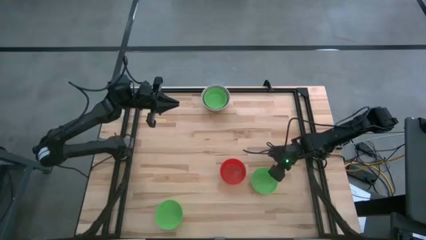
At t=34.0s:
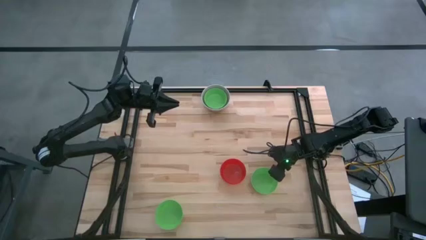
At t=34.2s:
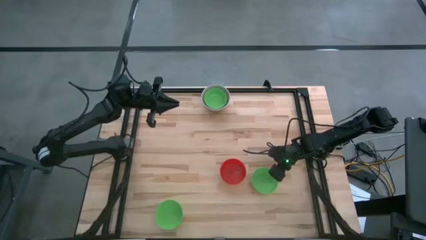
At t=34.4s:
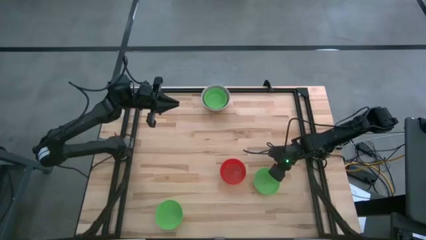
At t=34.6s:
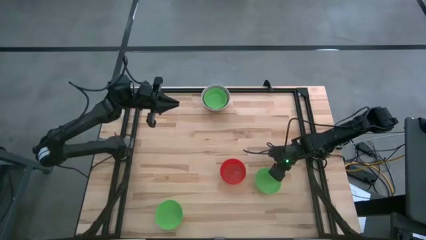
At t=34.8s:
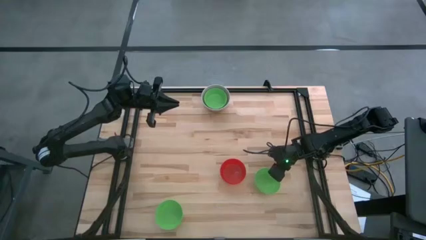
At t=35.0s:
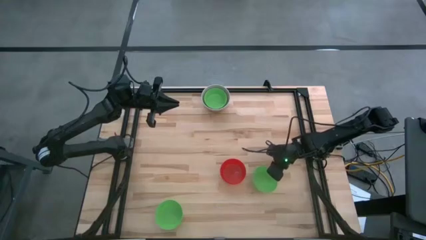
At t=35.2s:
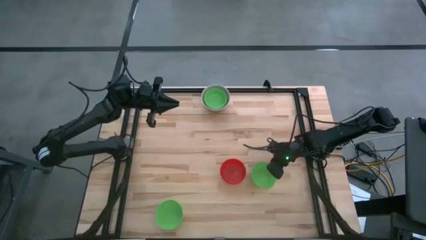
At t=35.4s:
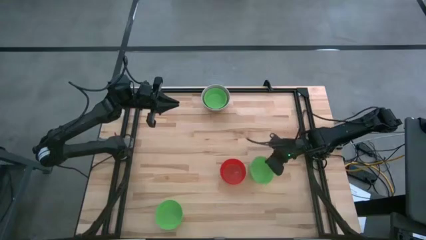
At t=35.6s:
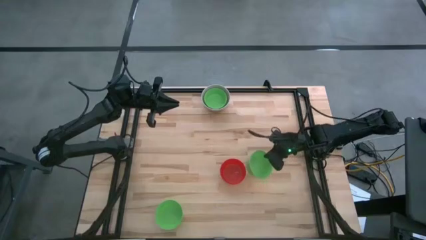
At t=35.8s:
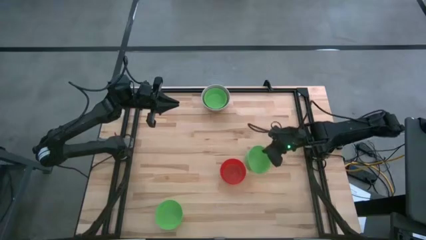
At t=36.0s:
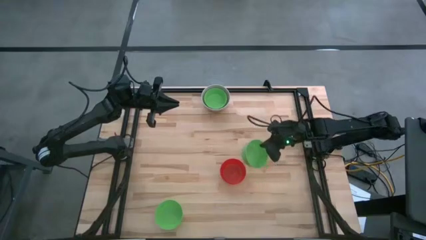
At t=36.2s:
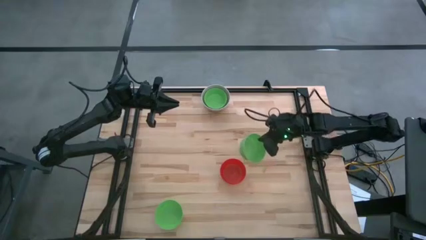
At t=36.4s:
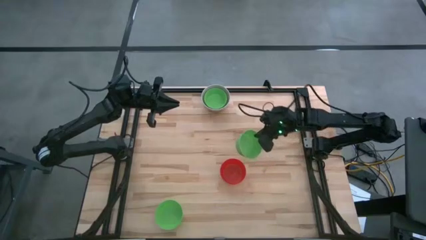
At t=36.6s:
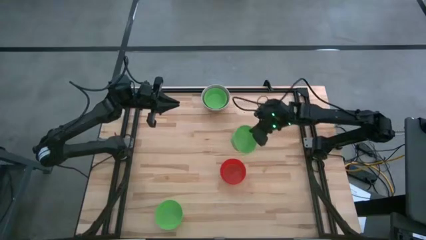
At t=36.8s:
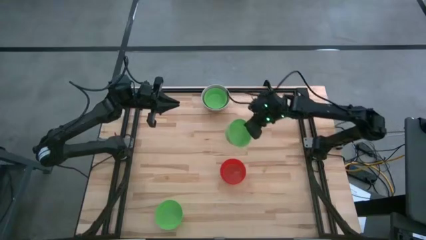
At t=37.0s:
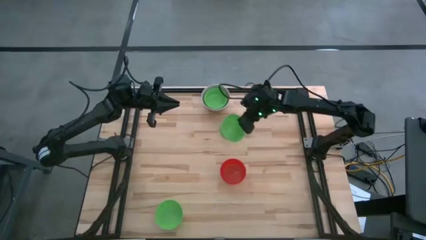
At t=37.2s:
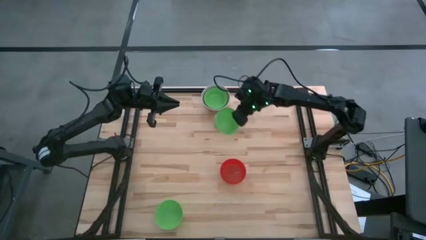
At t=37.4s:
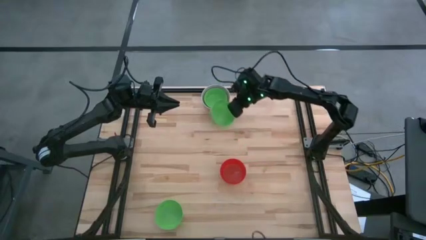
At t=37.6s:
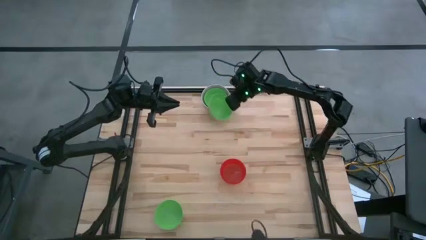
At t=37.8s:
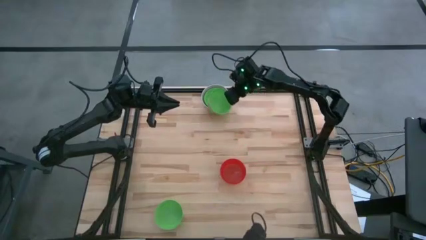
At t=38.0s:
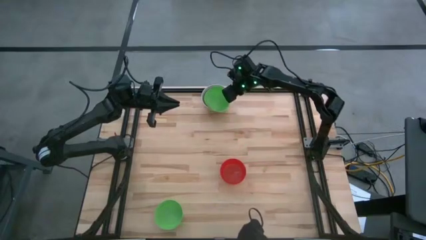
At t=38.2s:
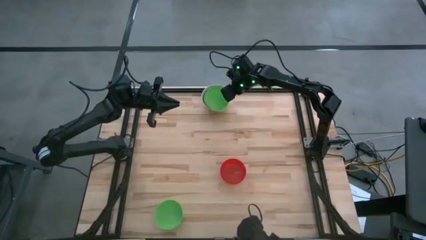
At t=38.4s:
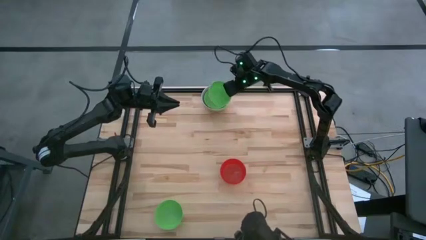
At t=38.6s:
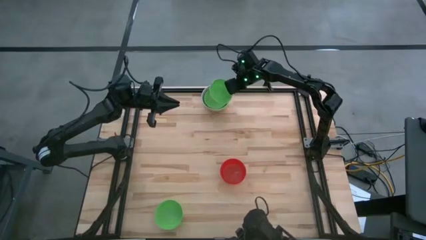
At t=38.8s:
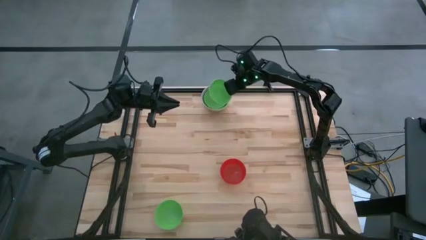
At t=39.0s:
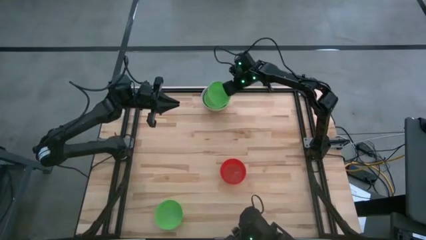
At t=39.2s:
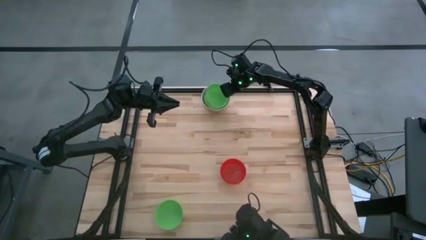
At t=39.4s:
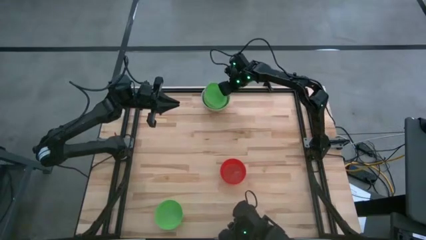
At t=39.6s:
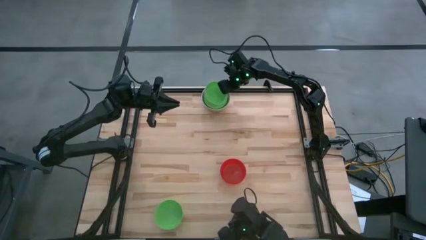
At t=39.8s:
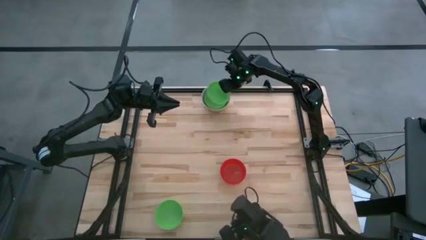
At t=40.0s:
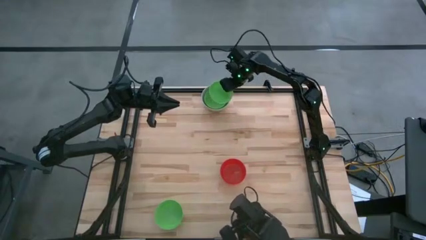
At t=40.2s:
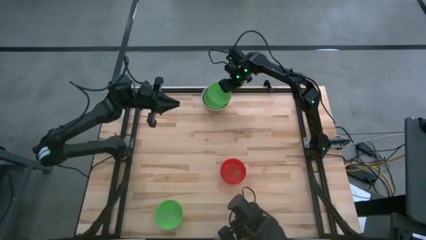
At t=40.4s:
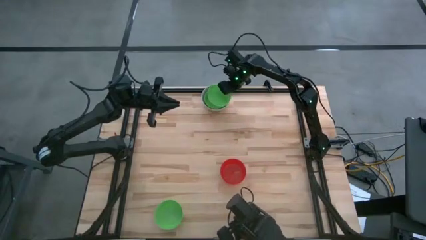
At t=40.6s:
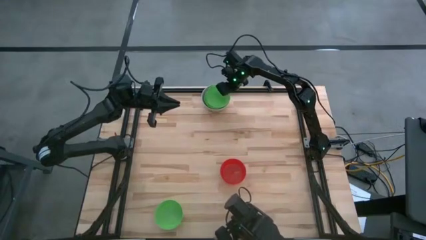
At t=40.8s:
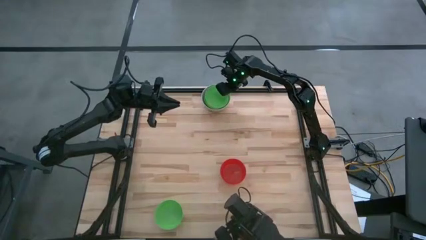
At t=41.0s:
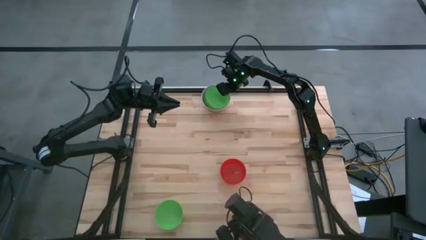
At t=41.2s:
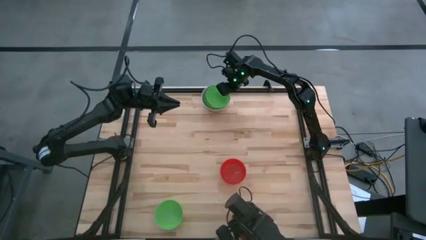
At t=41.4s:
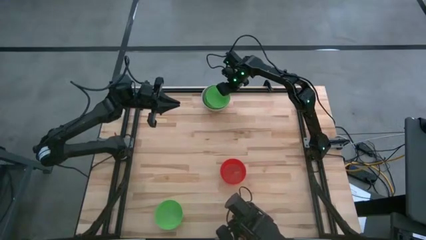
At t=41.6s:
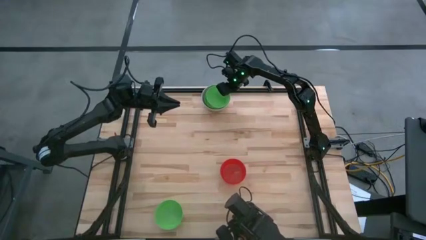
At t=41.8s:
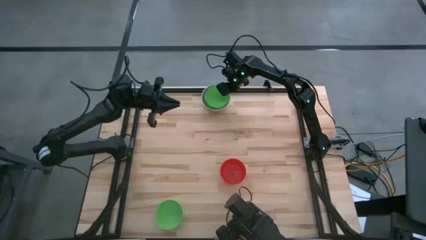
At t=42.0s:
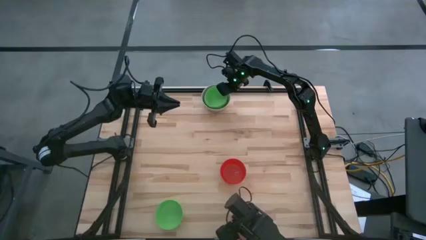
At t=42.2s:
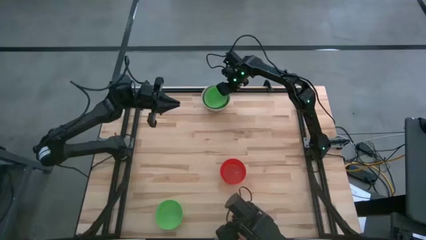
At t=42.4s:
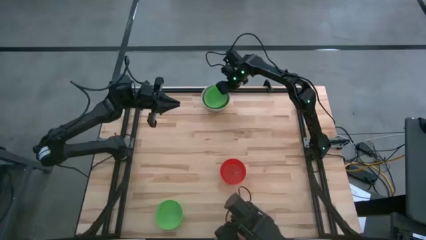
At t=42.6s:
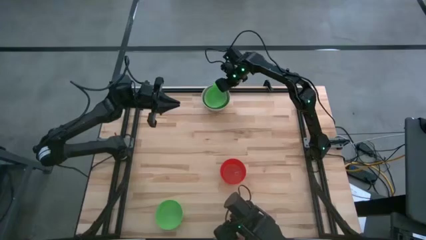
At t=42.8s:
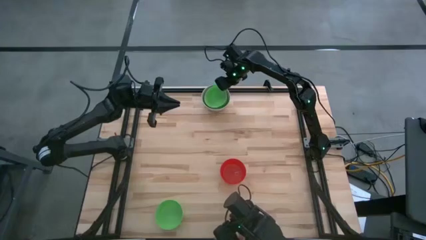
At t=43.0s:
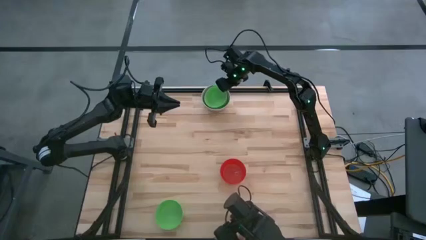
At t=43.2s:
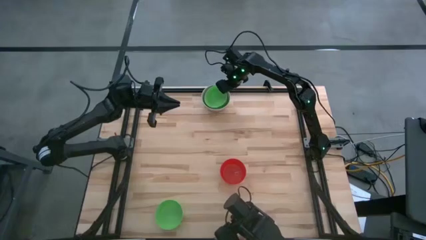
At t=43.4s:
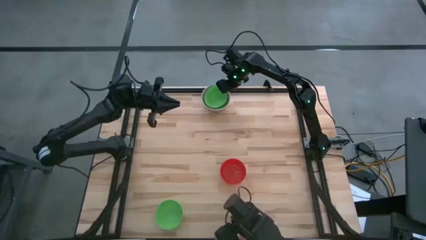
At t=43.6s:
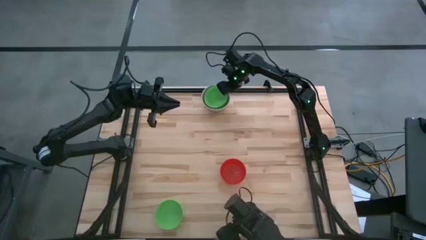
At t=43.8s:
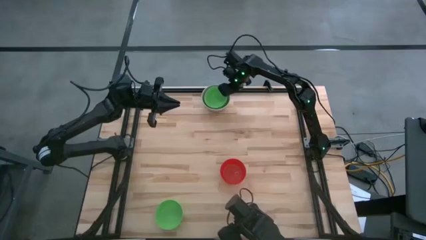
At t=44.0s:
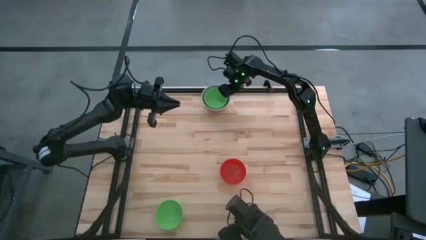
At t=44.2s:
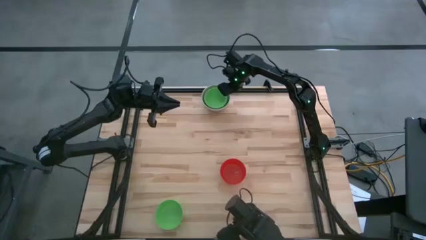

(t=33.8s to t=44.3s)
Stack the right green bowl on top of the stacked green bowl

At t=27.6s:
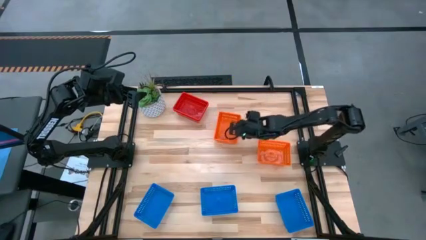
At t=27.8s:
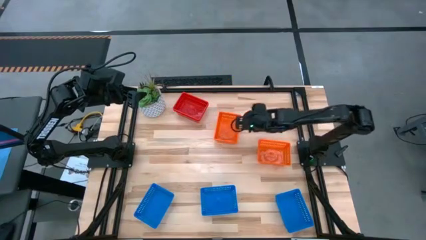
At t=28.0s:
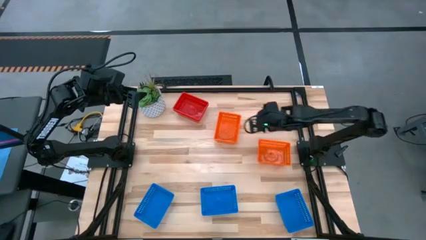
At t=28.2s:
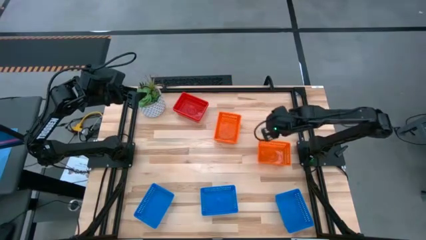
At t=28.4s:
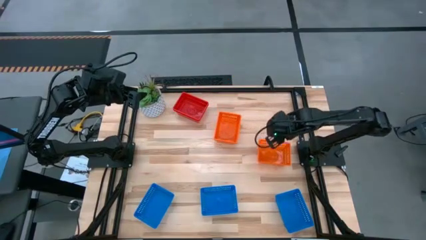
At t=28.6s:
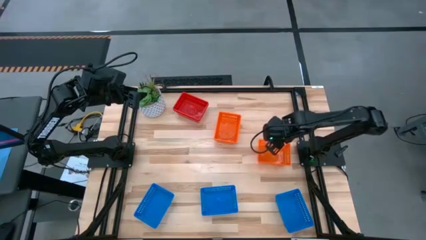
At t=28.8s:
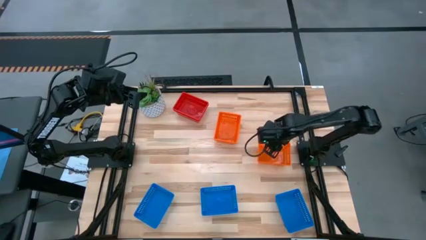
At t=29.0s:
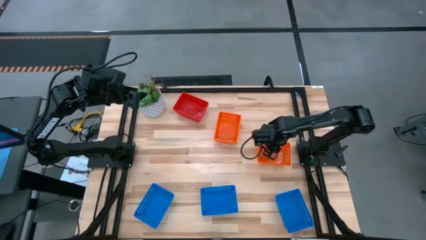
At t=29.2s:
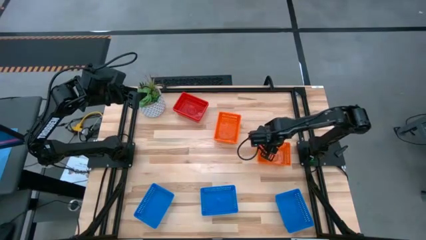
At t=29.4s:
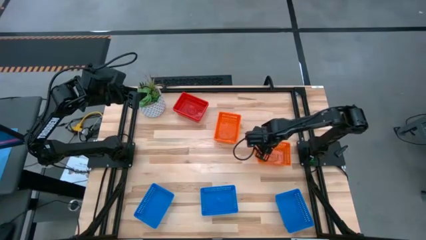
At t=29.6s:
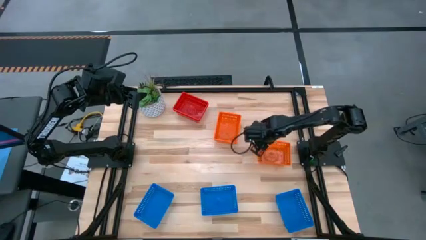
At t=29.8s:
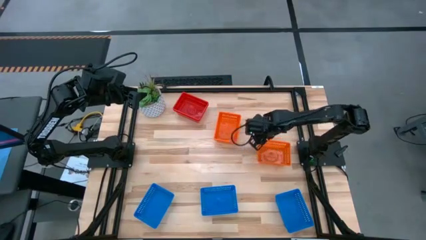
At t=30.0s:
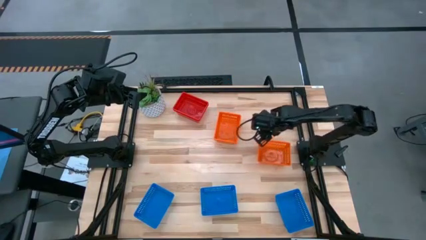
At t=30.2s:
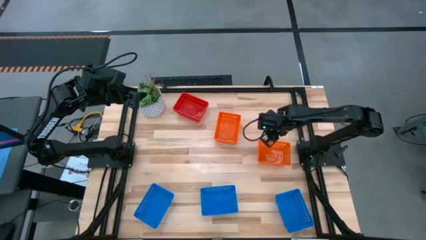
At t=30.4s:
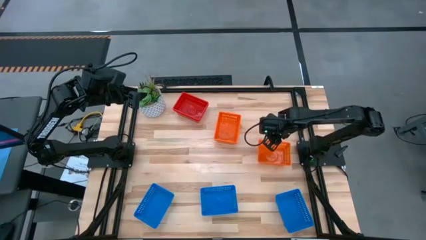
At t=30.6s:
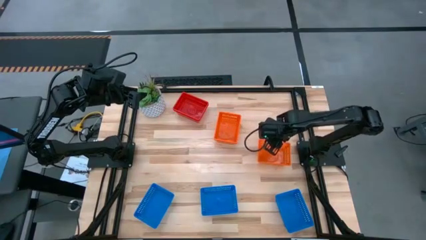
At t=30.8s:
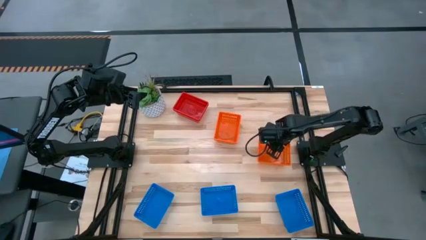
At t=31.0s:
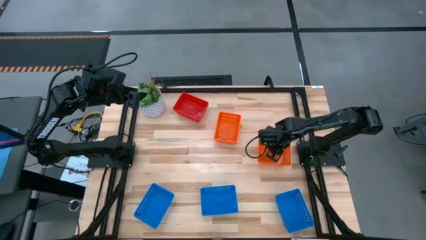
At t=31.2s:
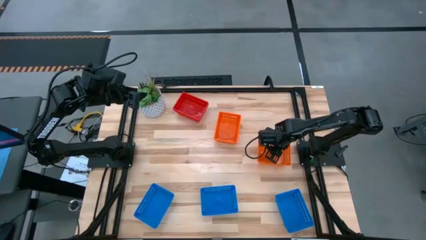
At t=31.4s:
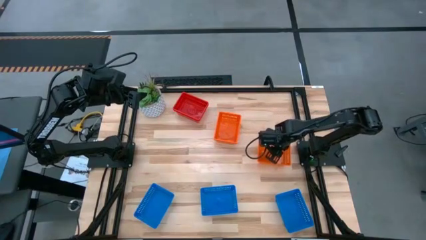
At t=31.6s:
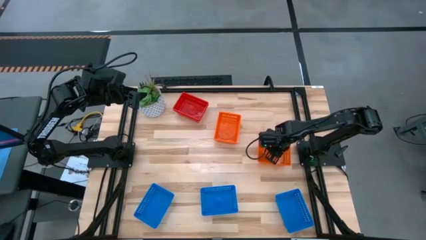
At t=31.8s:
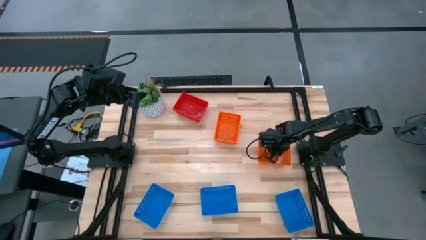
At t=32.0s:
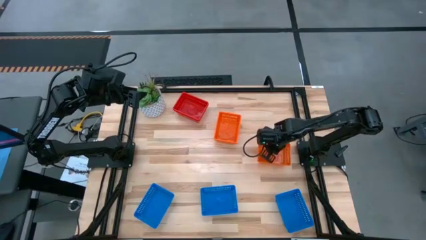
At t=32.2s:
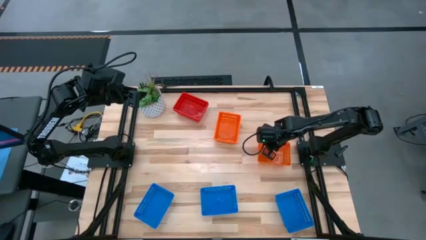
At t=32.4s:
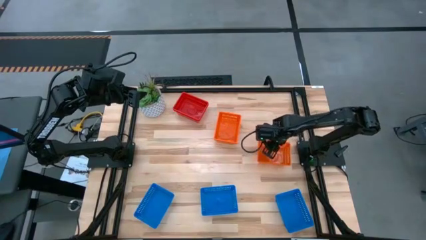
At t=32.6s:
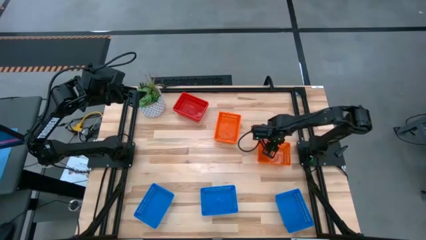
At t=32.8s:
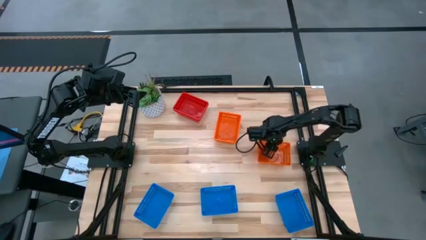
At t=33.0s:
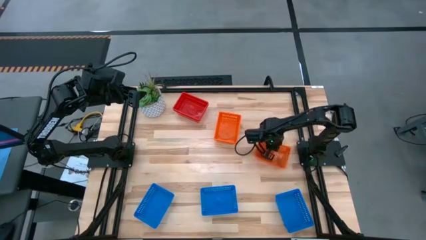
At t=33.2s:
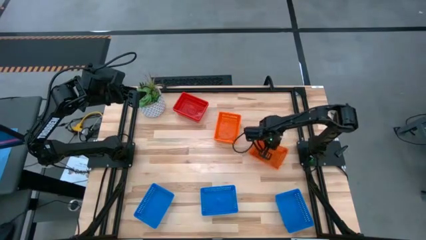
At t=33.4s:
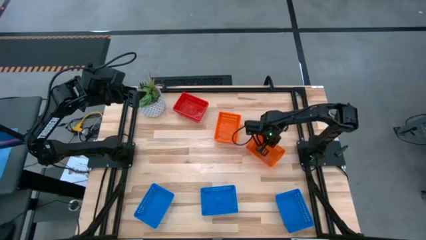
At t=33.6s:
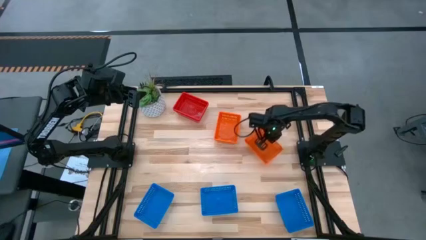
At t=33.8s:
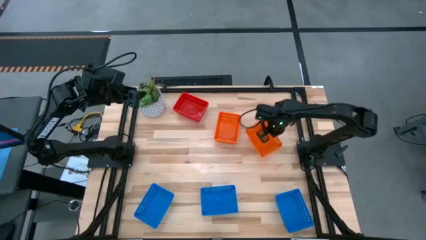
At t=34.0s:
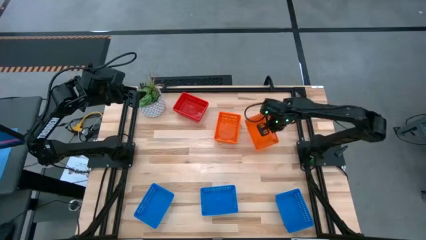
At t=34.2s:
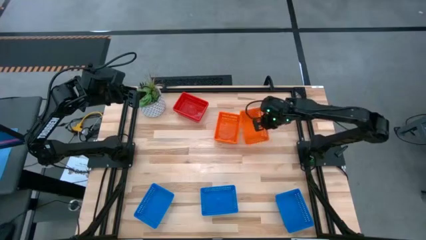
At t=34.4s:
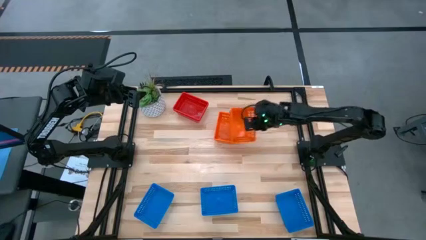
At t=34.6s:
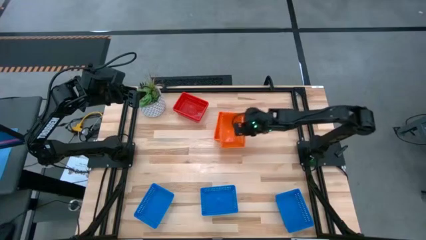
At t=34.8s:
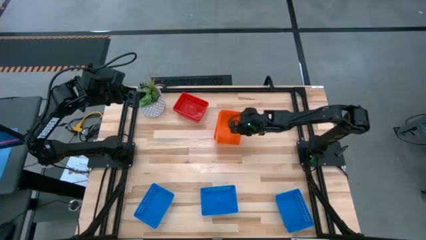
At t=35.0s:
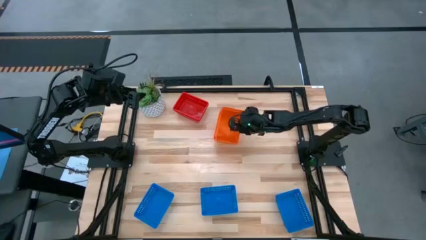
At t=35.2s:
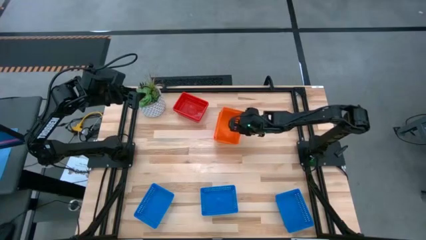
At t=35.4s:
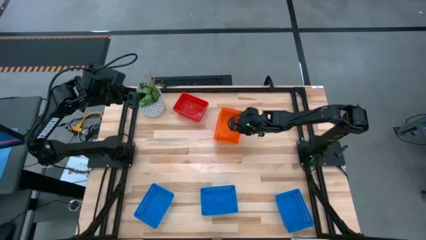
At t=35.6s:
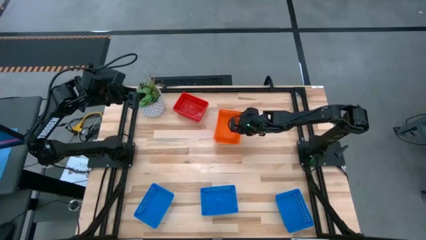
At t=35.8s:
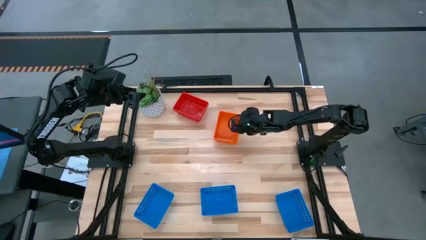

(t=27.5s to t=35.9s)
Stack the right orange bin on top of the left orange bin
